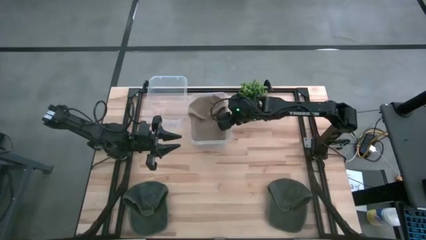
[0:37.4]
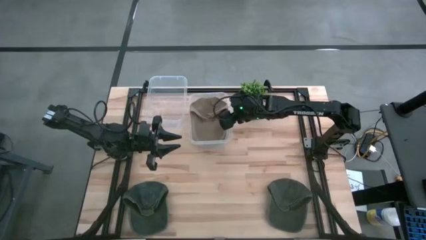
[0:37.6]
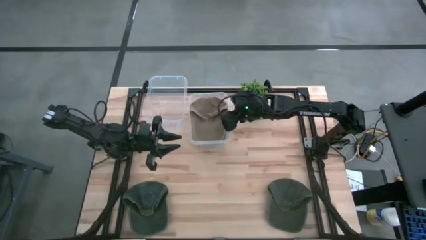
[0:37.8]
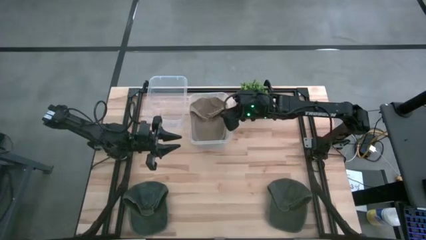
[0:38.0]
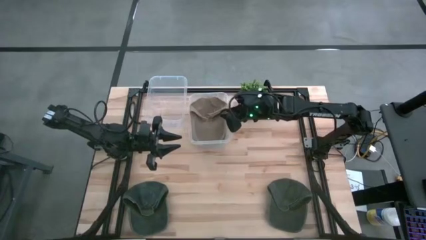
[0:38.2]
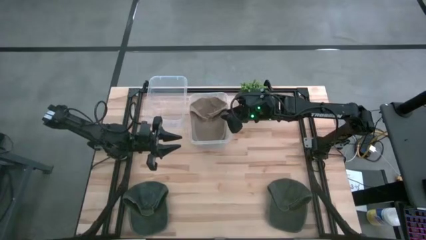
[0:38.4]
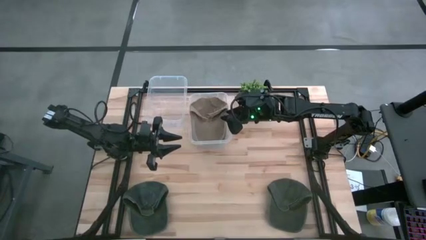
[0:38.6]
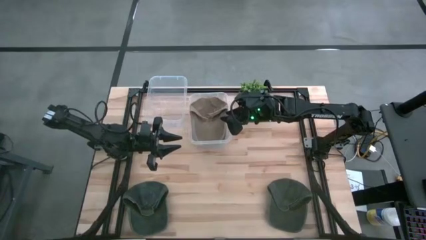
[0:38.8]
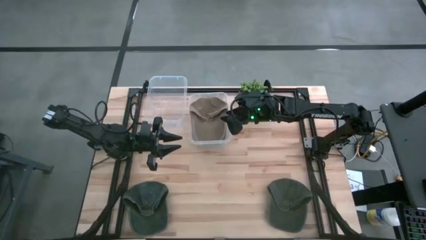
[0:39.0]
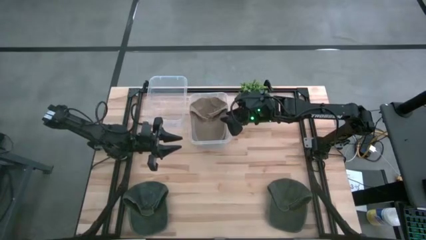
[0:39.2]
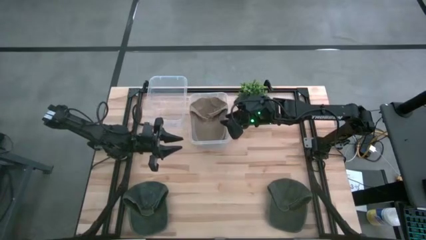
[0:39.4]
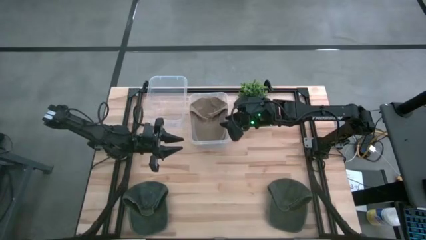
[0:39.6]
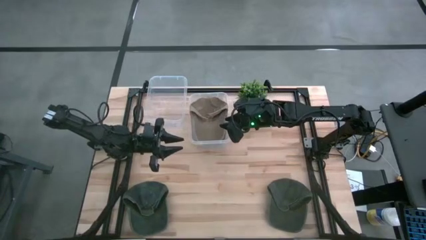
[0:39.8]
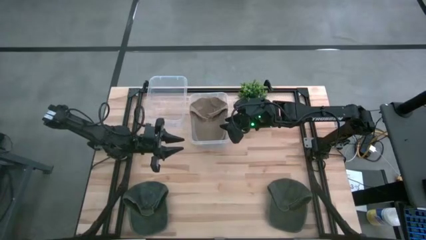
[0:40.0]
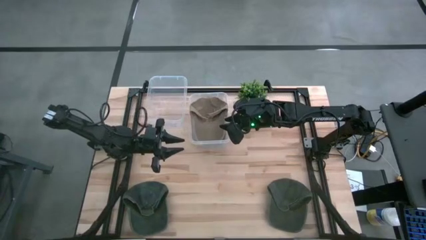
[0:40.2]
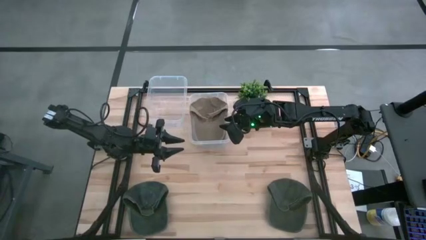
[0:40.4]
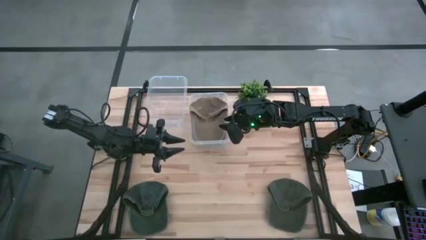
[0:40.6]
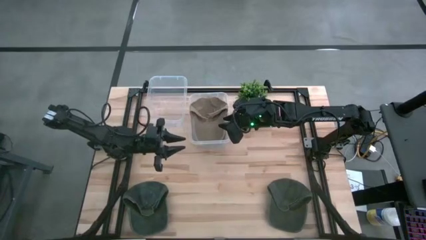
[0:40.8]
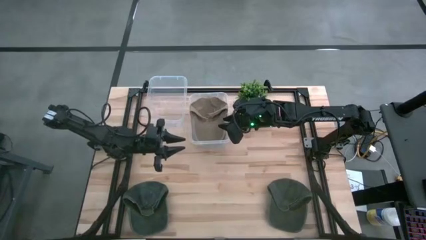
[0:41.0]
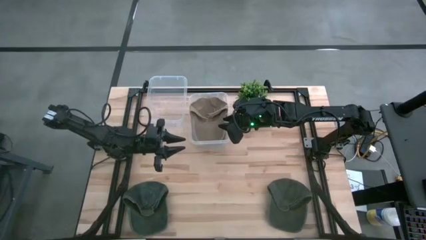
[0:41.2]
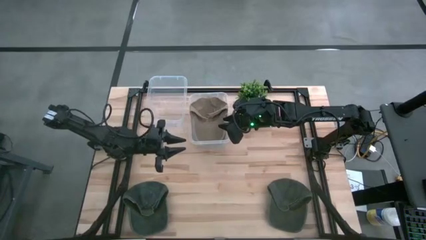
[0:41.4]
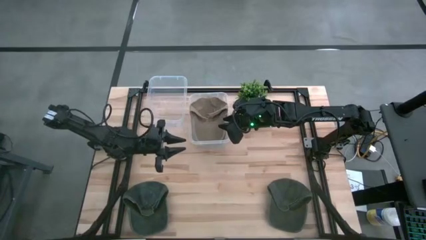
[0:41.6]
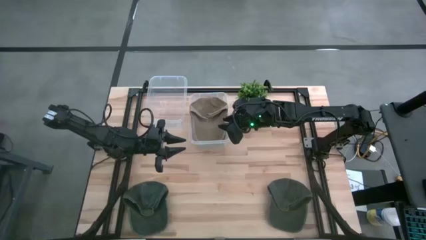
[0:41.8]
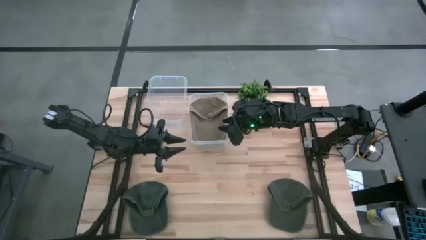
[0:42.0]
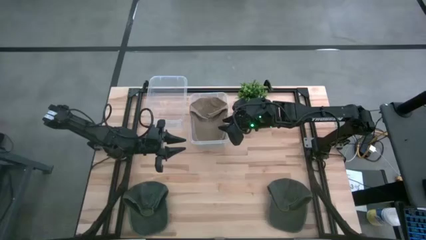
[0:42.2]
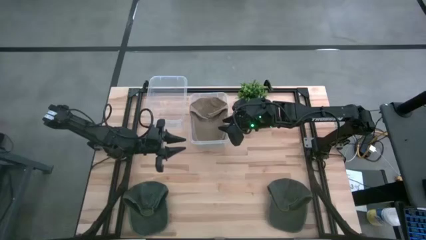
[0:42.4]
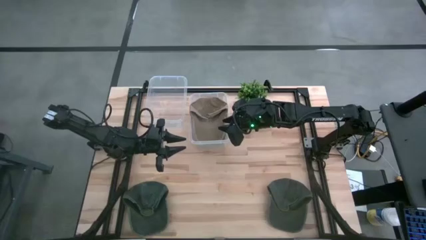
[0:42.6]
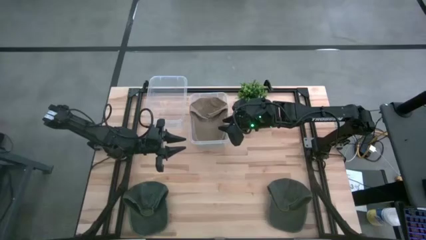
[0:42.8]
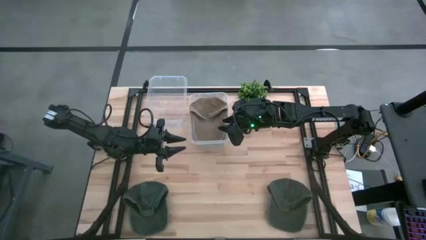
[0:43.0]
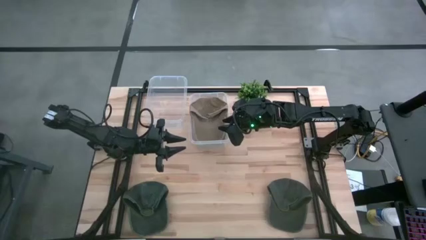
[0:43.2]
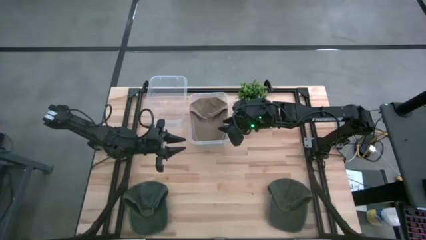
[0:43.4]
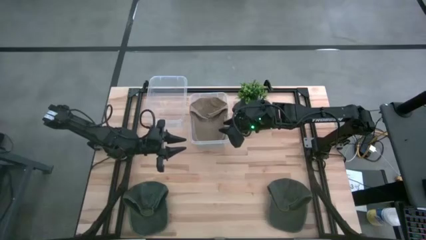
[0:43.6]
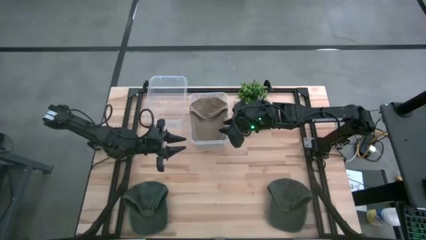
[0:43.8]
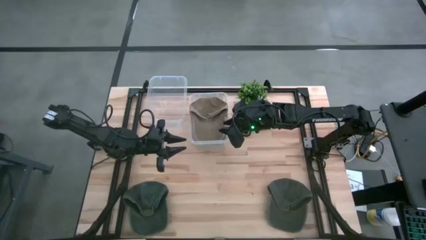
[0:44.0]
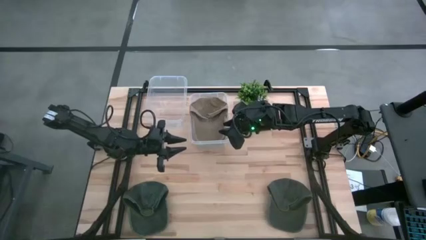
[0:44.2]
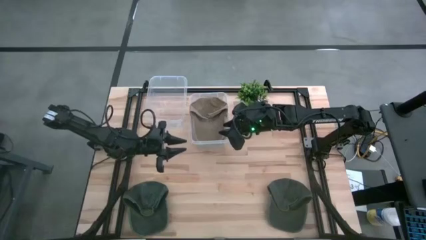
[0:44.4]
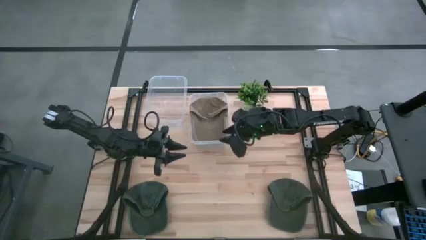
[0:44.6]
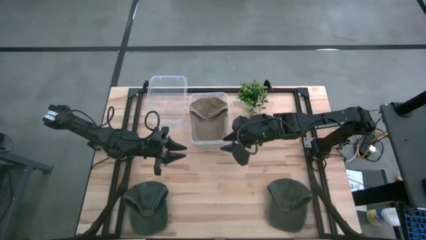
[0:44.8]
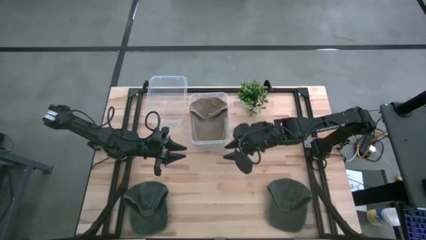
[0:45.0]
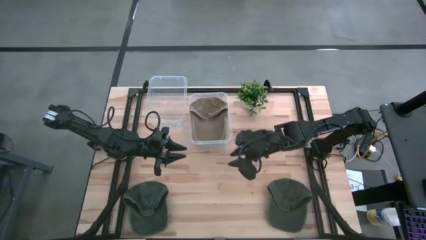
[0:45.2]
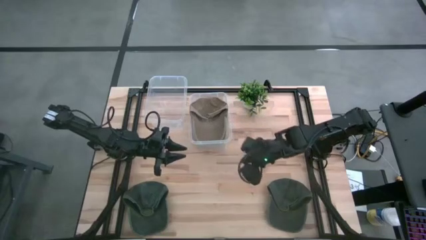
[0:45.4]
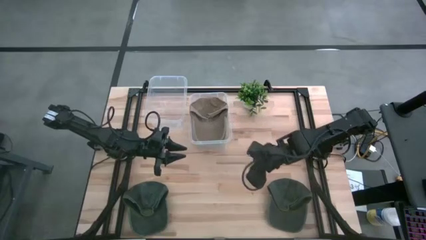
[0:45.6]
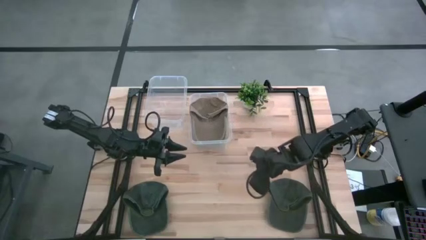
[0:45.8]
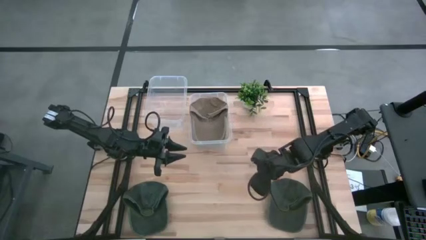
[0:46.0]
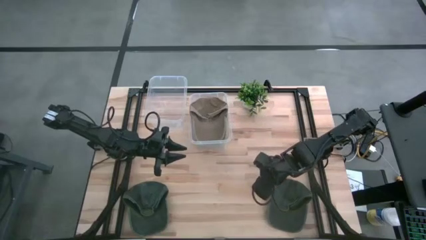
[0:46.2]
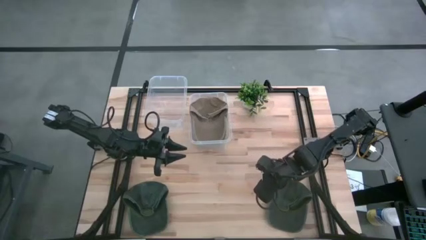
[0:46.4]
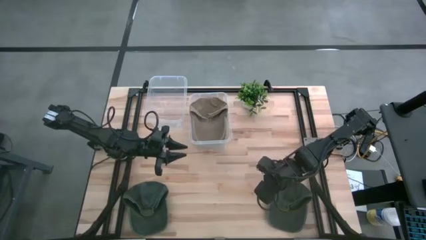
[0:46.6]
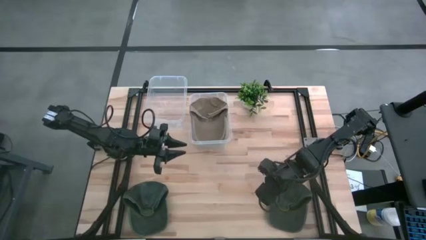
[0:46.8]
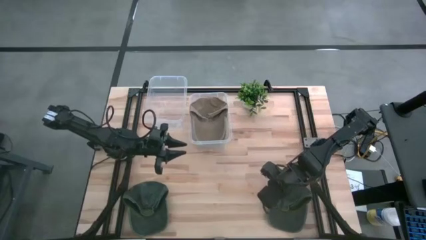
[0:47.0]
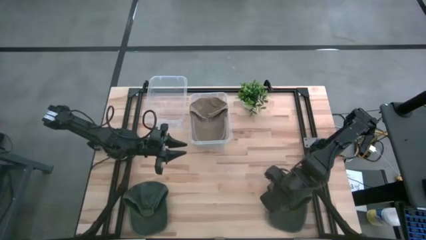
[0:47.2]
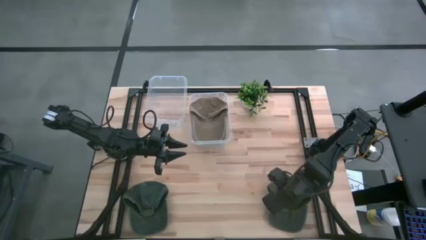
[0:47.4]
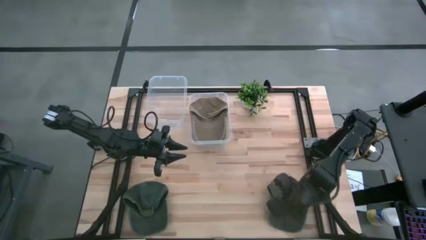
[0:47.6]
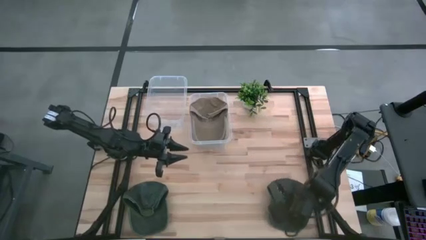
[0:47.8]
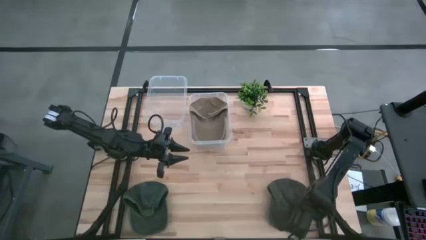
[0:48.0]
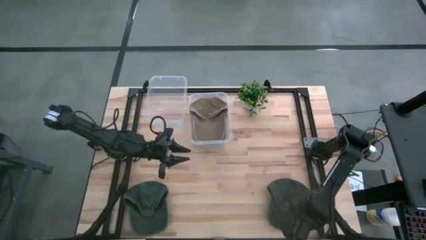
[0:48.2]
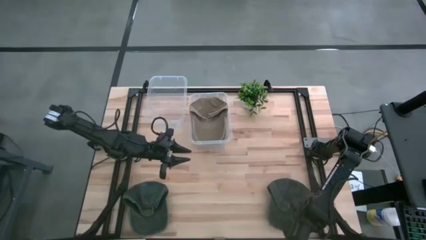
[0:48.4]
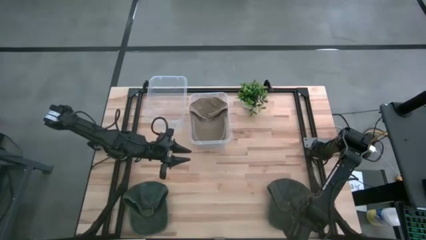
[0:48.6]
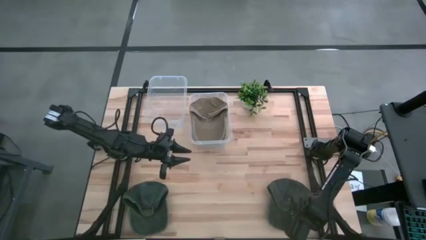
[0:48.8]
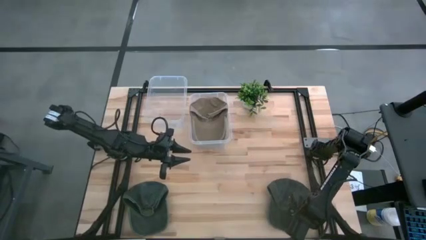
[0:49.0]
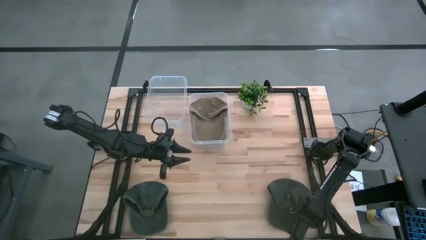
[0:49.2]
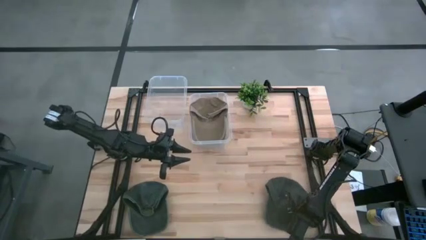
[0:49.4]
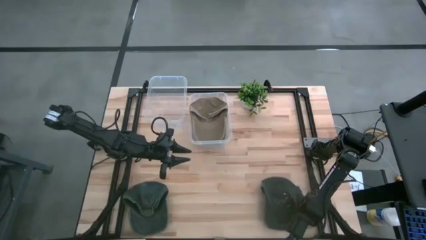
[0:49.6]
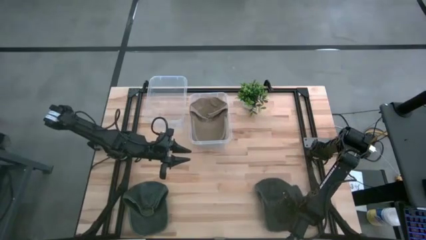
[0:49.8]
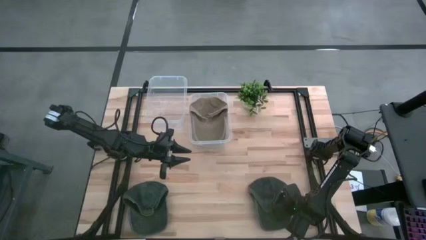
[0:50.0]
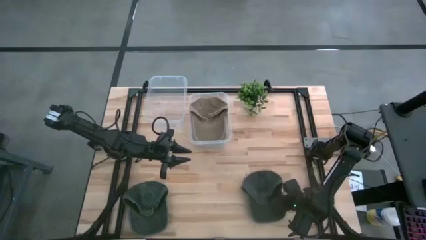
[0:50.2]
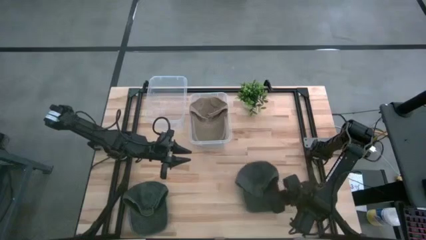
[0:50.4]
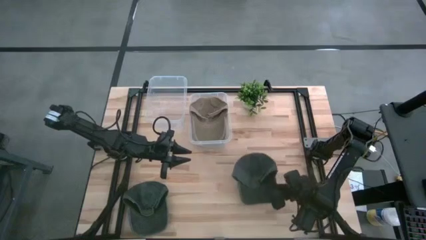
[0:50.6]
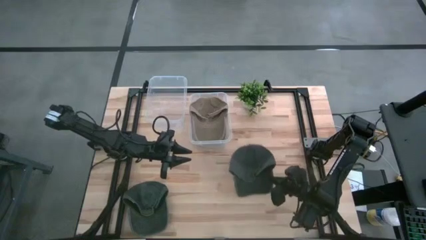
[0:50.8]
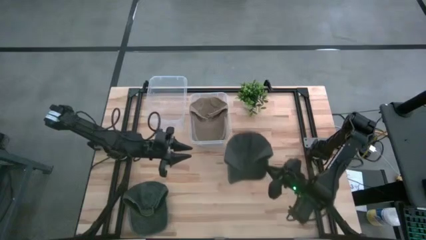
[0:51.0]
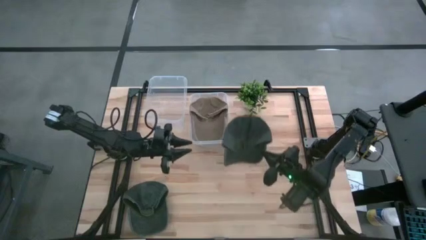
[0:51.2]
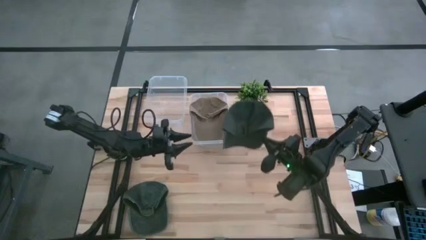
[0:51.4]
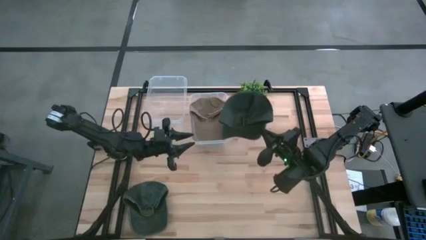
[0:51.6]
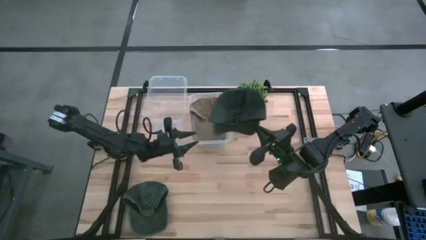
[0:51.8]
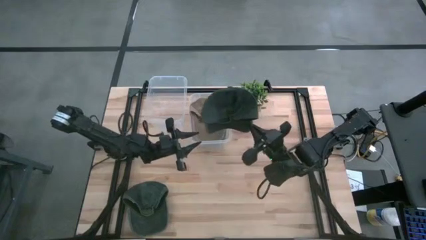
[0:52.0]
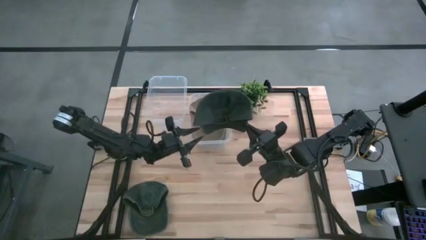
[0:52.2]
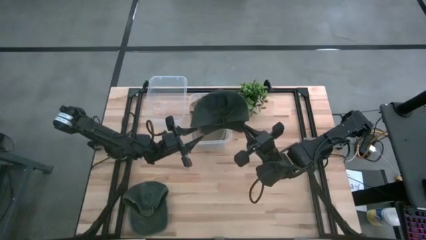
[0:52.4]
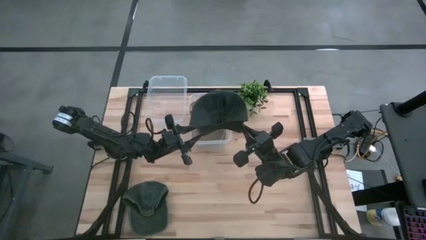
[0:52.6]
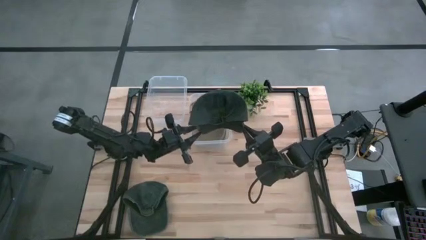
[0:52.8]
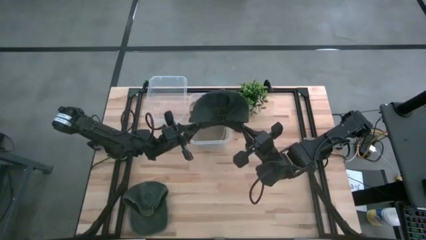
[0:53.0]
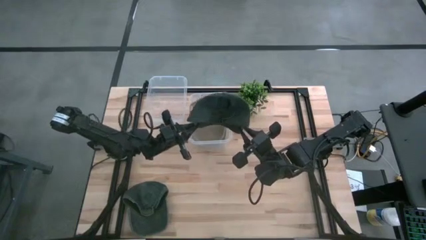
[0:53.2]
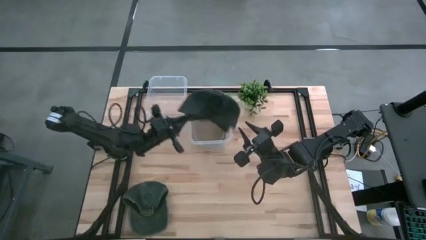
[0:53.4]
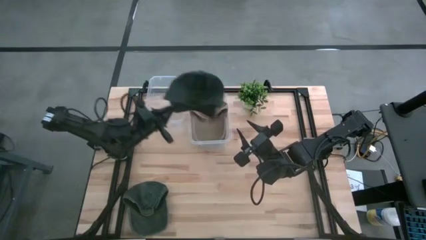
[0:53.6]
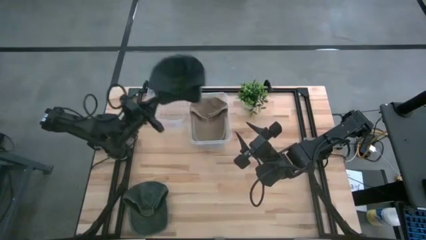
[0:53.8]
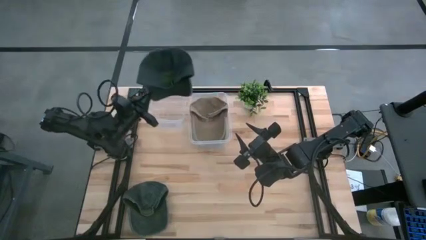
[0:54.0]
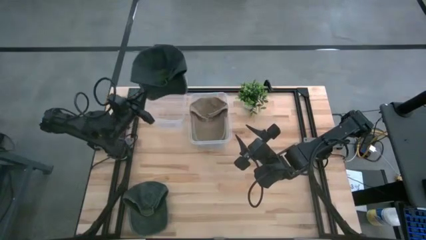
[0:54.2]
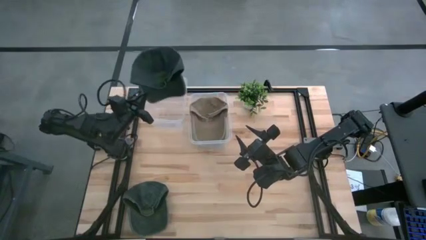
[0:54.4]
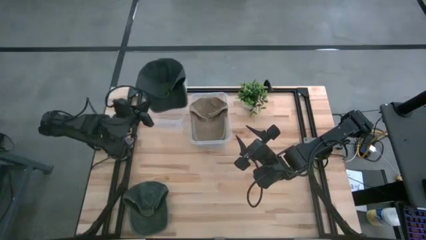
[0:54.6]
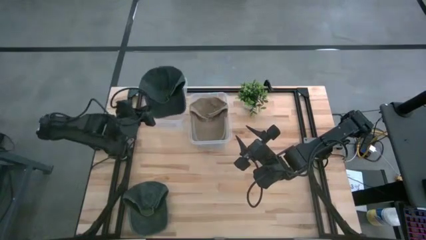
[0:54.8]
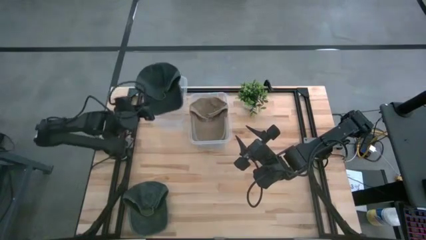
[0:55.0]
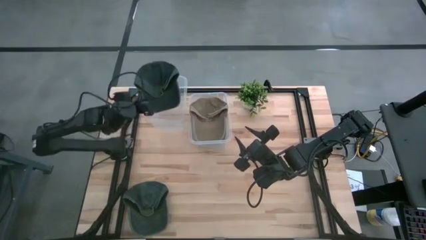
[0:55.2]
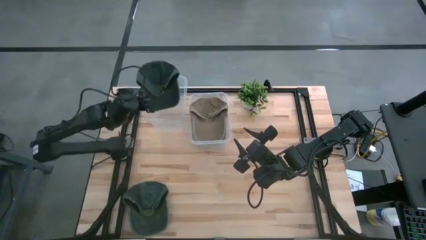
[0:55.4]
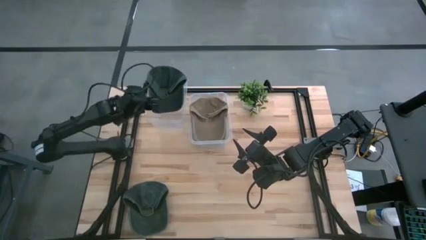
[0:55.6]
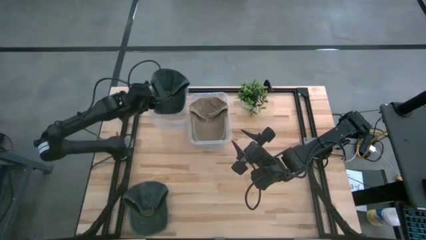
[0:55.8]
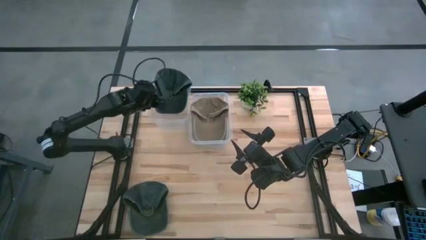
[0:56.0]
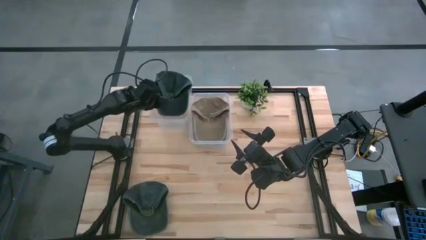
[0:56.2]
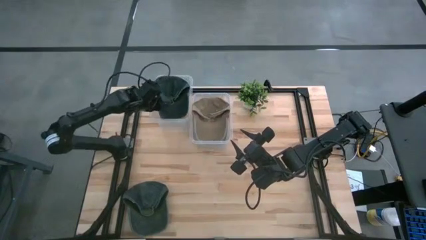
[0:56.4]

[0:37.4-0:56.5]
Task: Pick & Place hat
Put the right black cap into the left transparent bin
